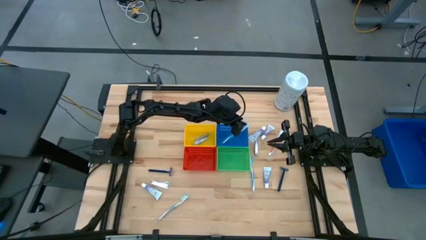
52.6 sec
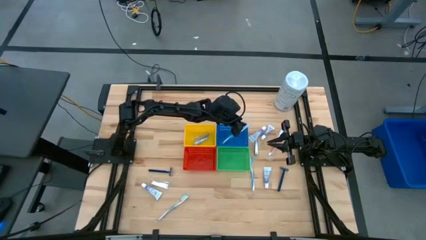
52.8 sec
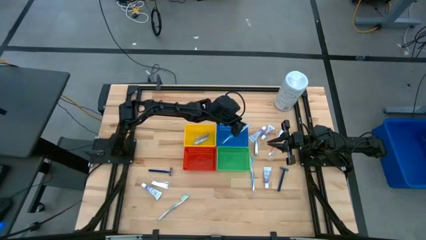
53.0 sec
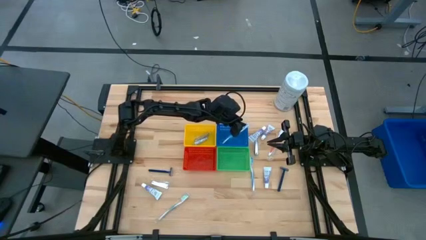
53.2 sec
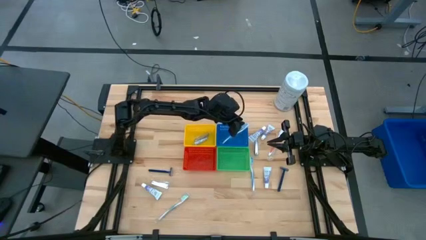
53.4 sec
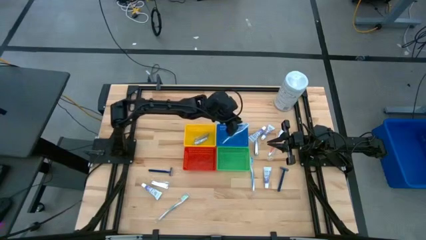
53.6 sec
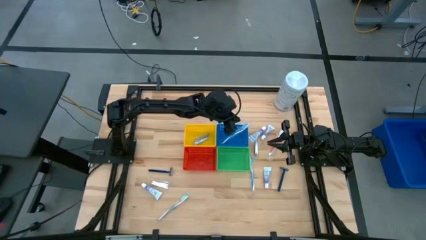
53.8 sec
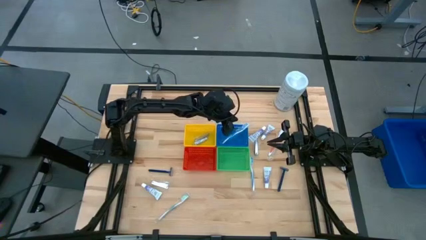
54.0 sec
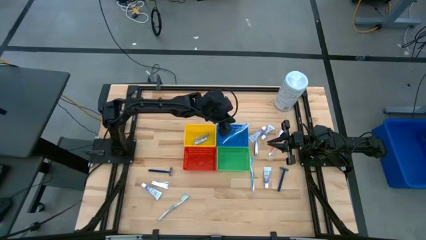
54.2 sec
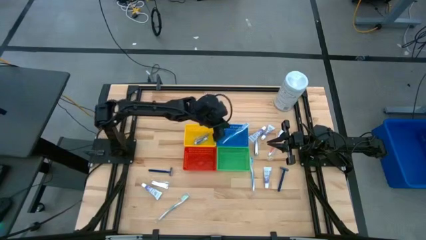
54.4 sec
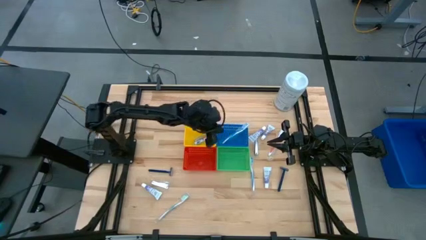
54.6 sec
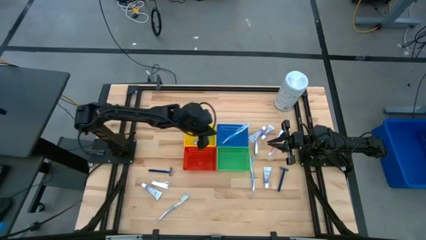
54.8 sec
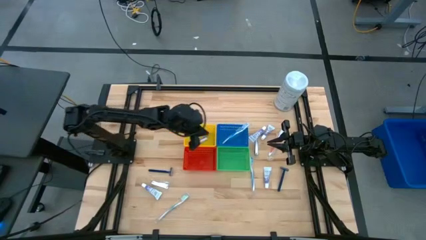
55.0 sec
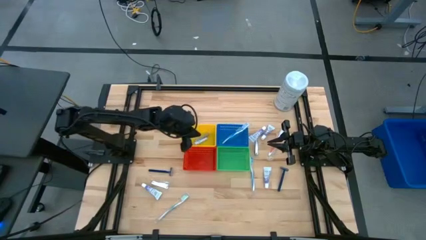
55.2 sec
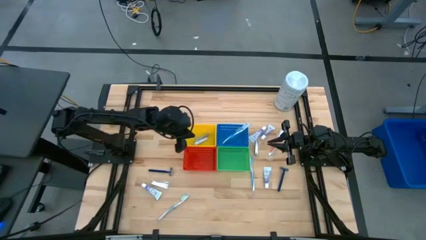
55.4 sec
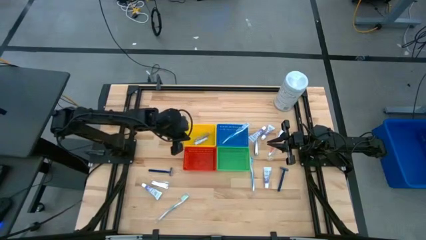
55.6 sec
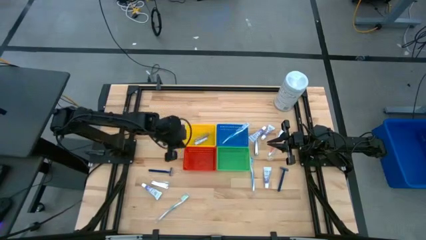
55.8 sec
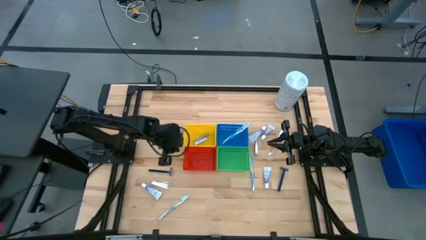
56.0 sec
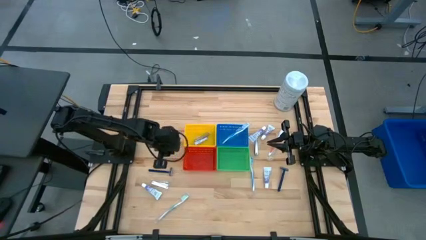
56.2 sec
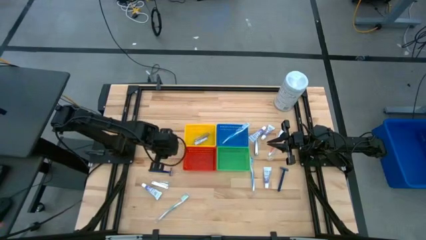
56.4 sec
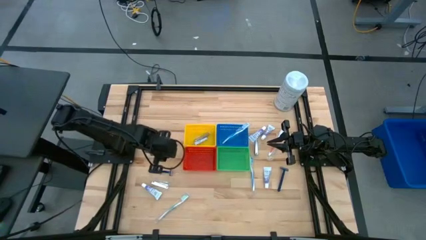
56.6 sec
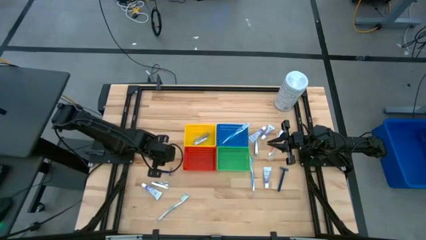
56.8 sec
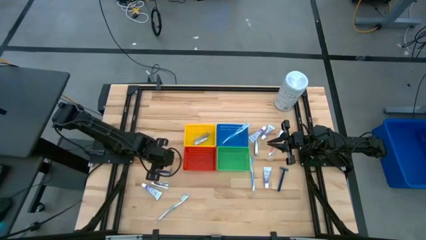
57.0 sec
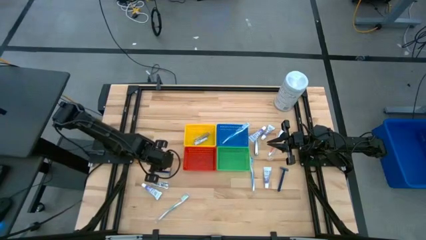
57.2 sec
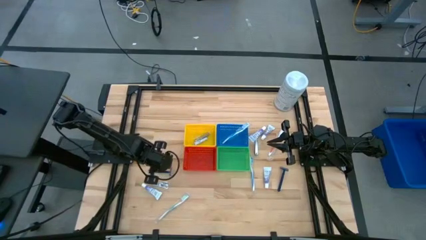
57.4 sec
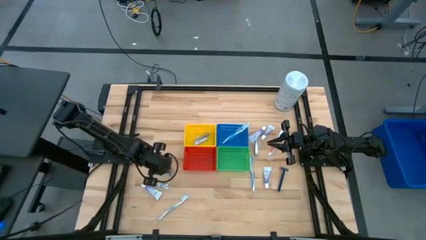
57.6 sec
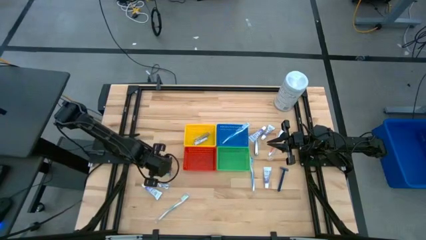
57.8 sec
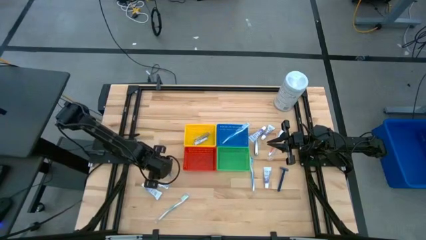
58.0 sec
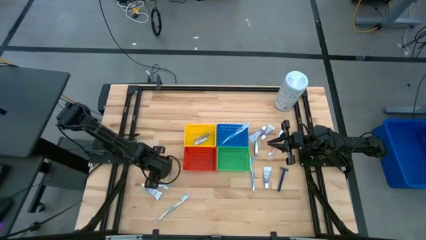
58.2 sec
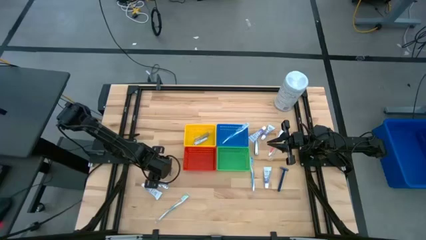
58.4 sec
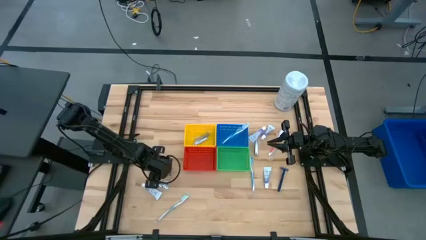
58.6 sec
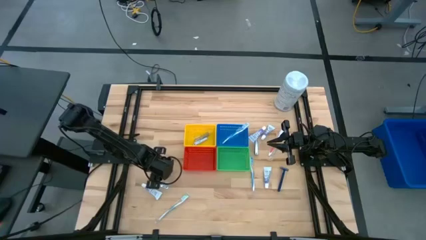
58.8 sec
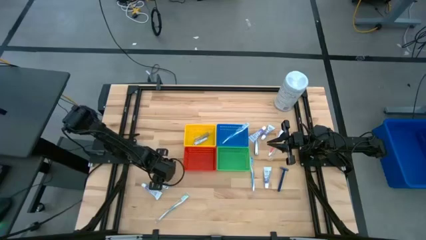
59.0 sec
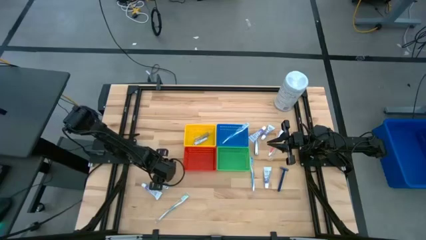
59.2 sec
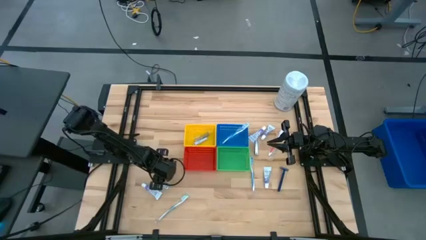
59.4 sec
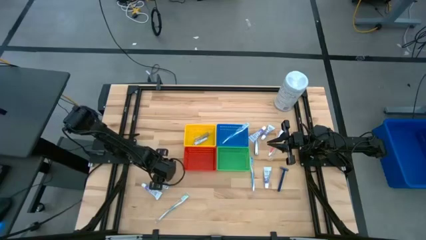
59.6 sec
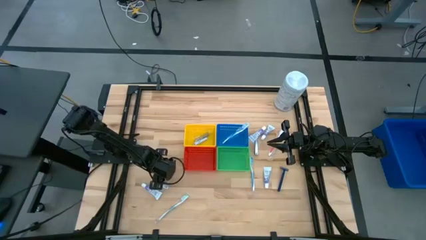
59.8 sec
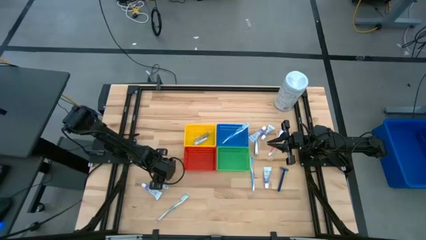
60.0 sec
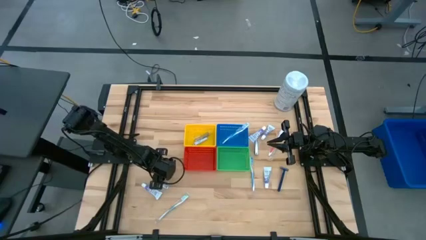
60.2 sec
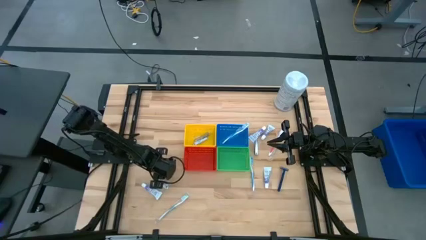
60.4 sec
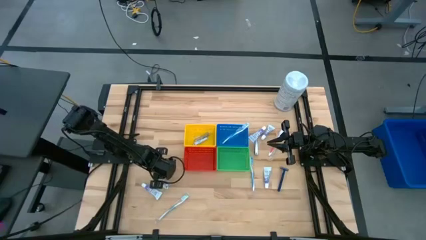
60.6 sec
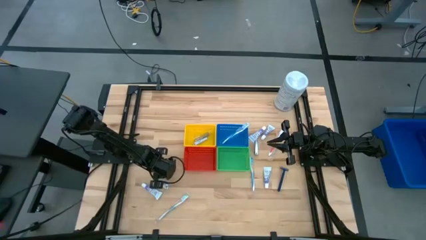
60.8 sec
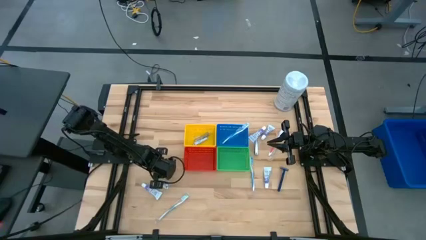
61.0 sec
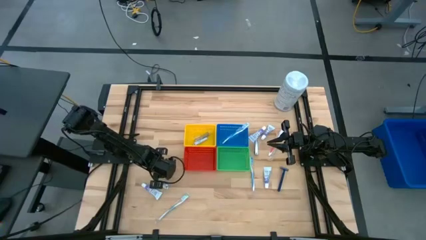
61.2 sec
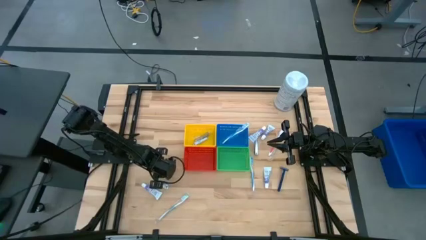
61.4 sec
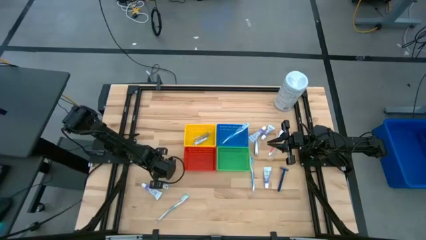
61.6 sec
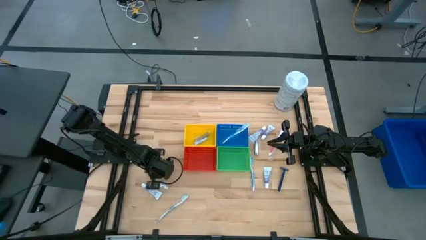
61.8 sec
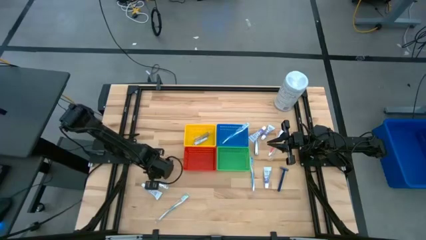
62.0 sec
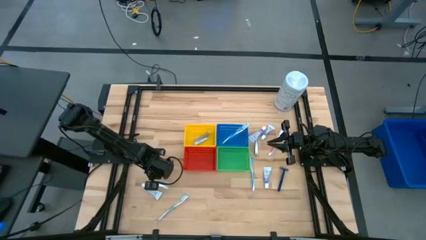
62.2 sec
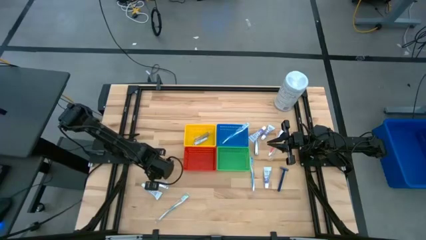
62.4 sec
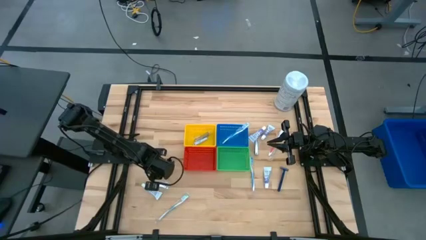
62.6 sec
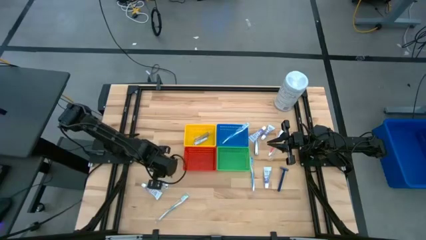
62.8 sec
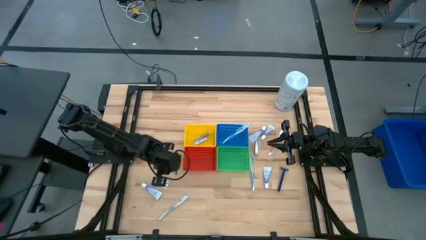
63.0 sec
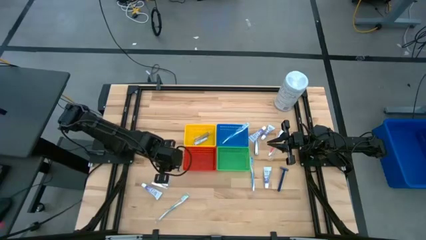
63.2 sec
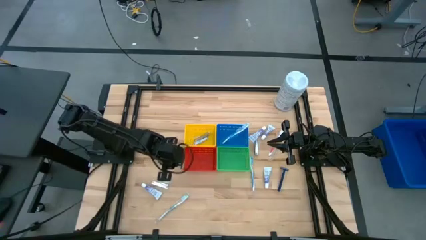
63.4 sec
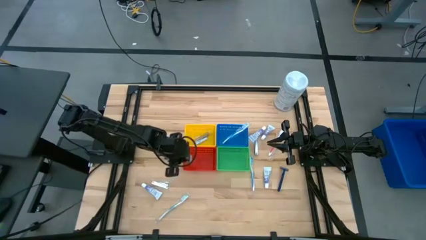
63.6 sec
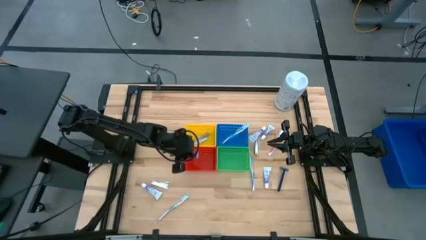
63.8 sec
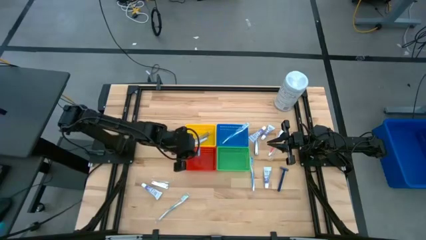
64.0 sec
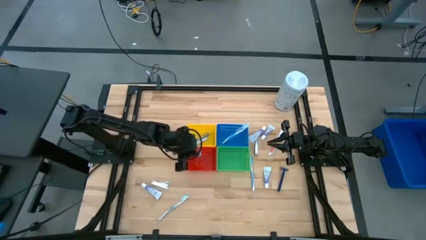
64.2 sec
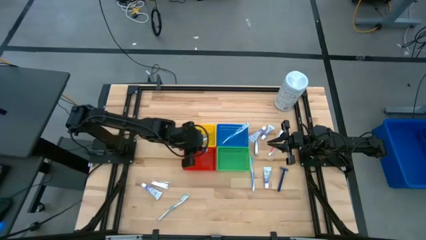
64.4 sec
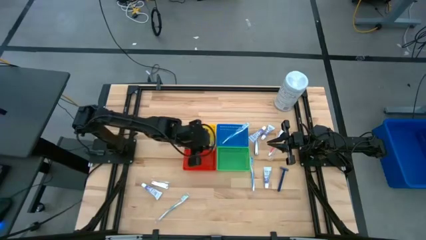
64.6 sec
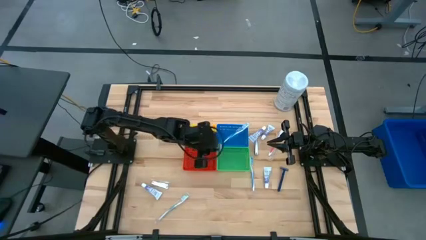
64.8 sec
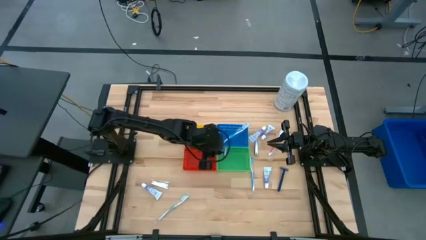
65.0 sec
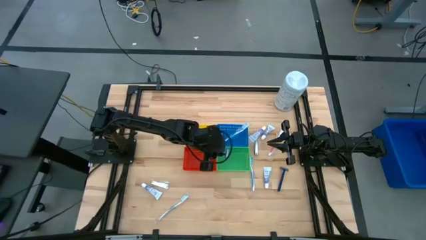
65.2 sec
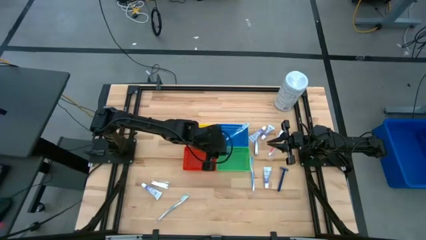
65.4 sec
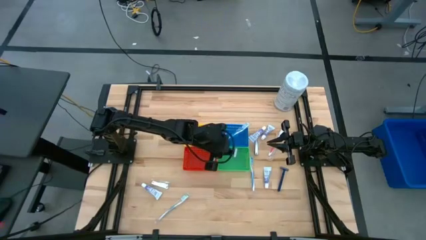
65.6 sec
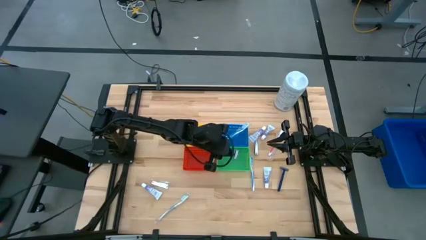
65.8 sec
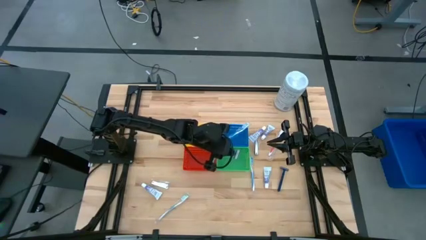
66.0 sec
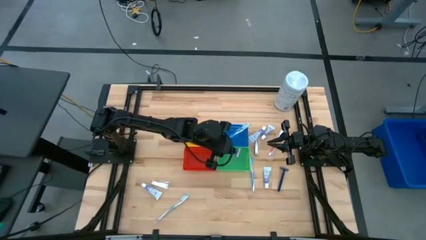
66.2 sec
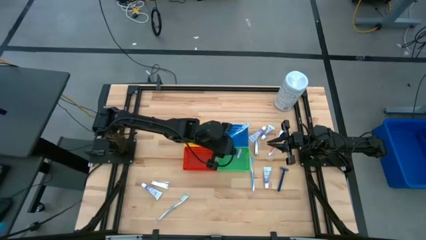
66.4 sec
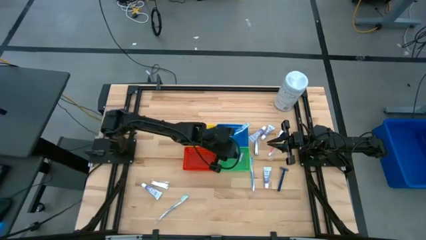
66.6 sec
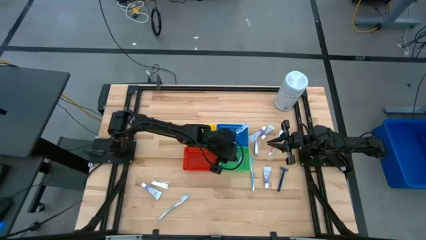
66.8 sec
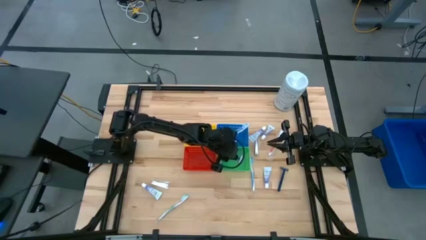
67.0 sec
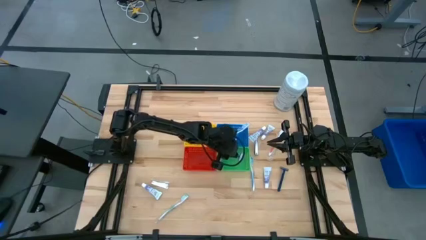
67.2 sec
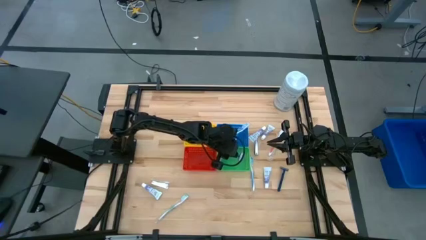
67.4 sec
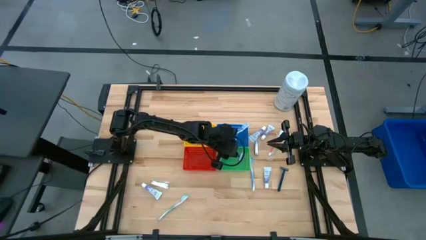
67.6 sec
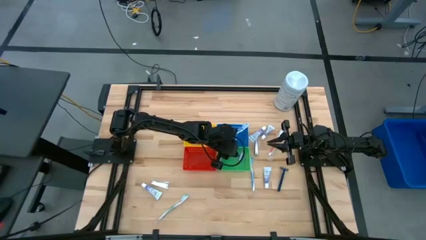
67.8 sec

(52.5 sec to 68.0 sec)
Task: Pick & Place Travel size toiletries
Put the left shaver into the green bin
